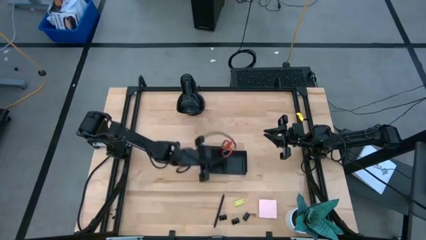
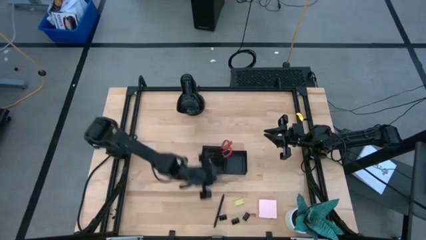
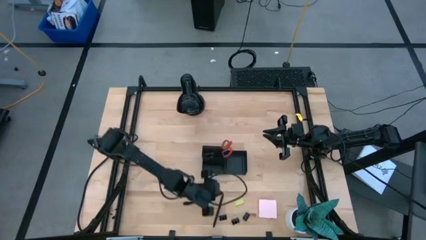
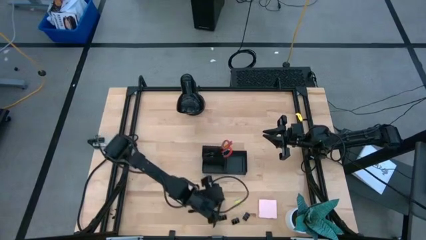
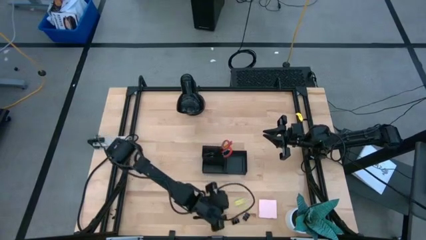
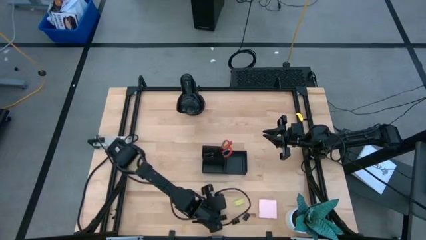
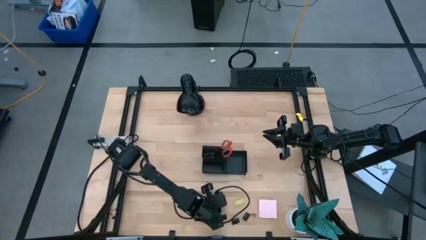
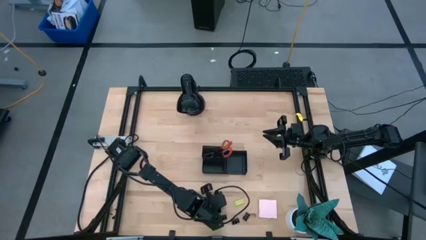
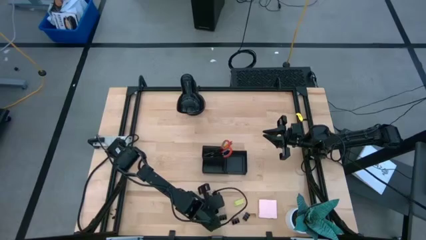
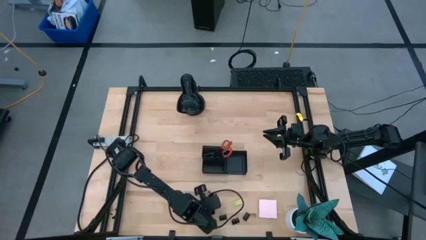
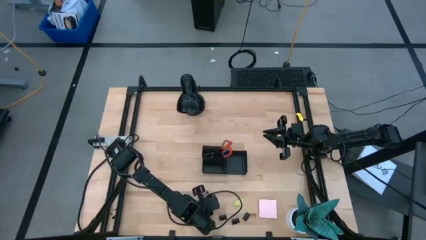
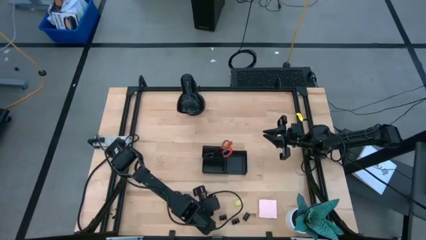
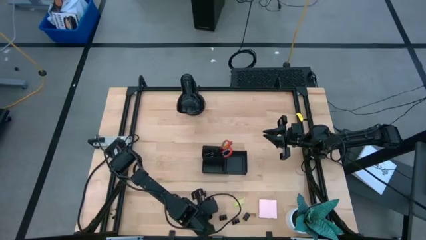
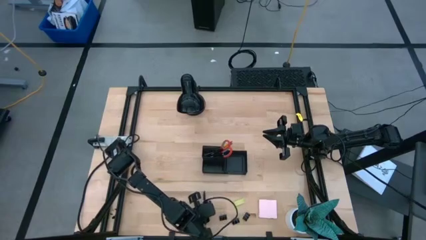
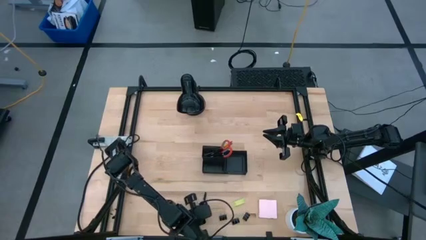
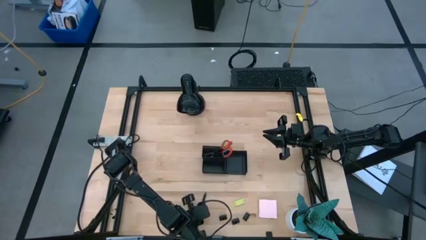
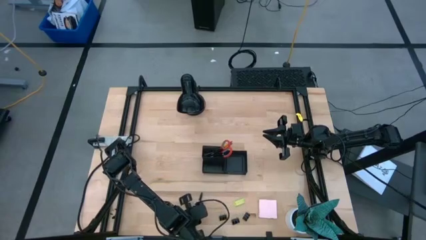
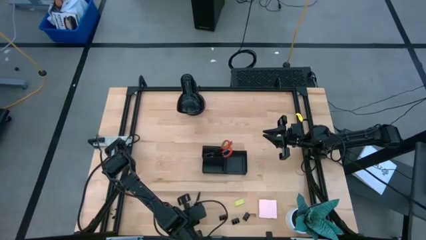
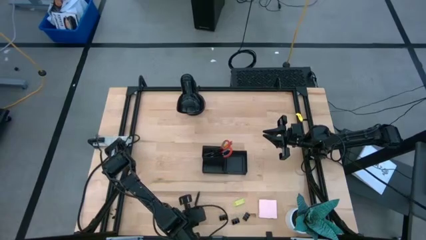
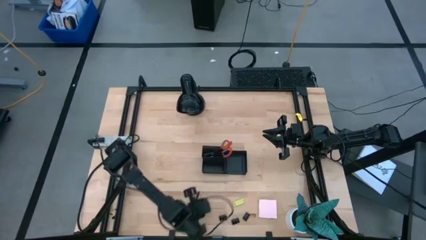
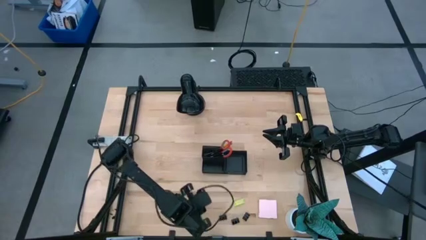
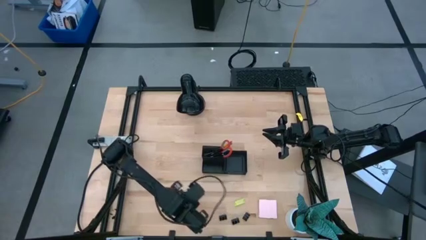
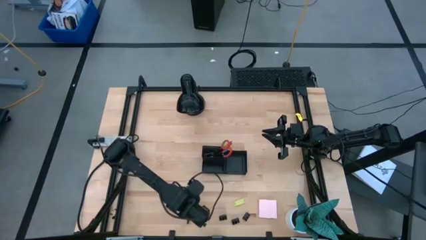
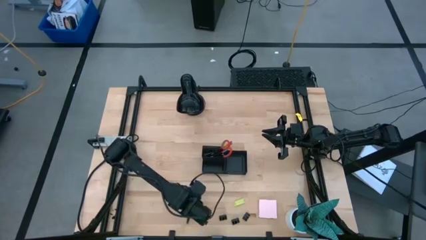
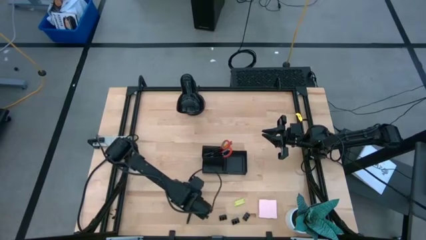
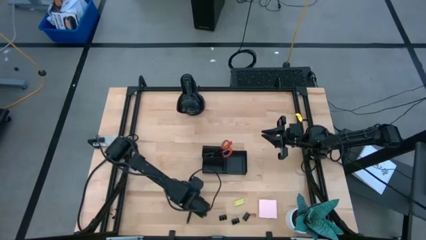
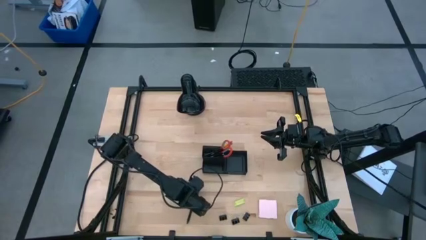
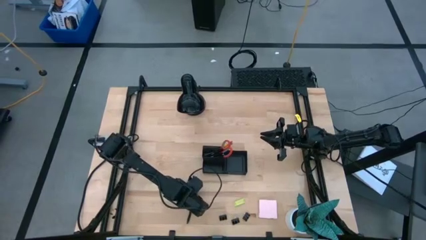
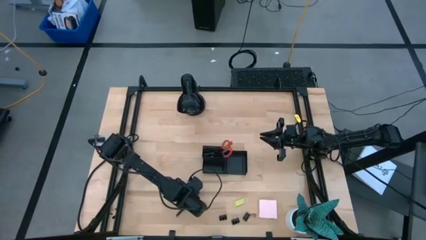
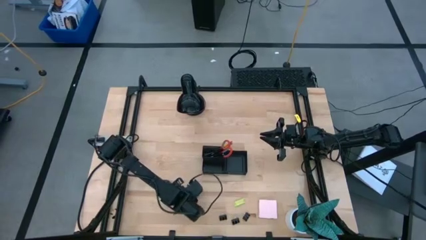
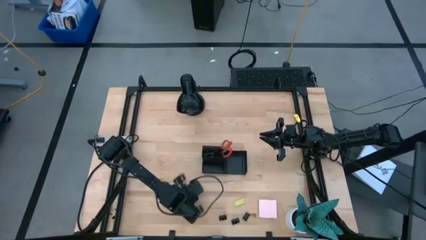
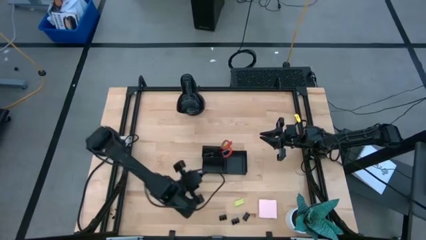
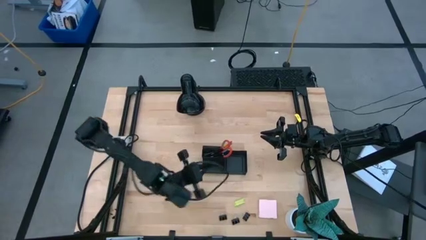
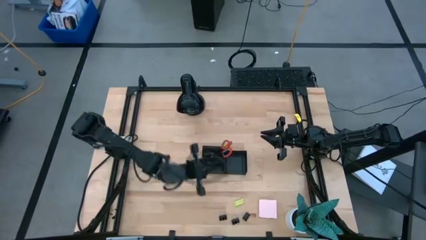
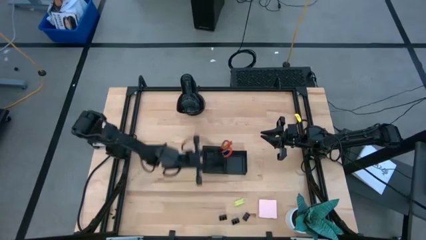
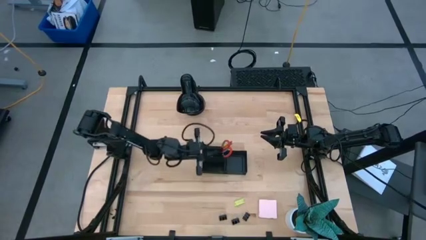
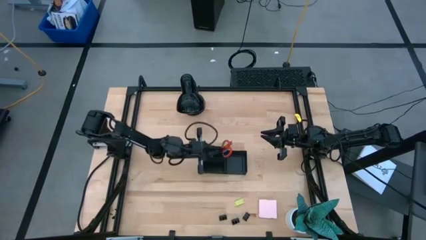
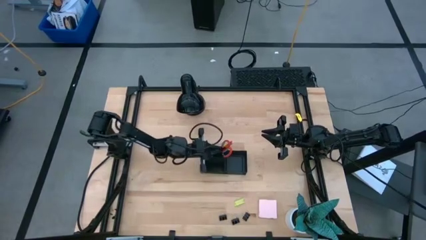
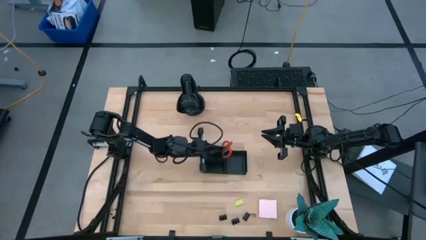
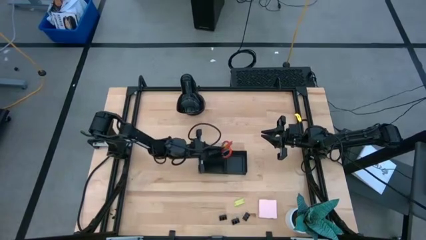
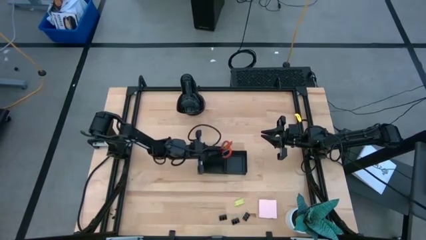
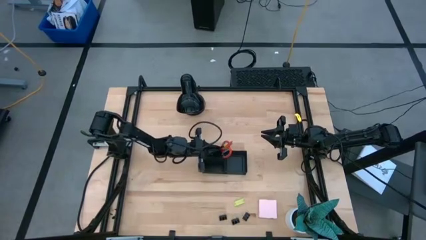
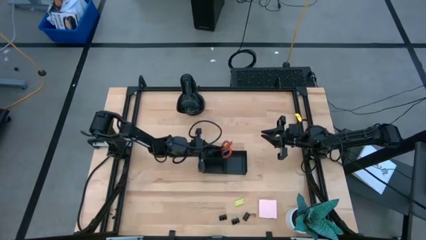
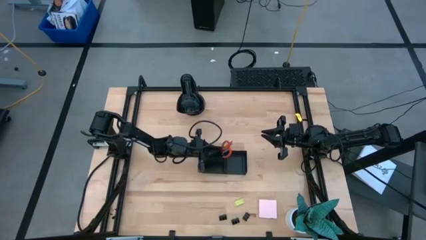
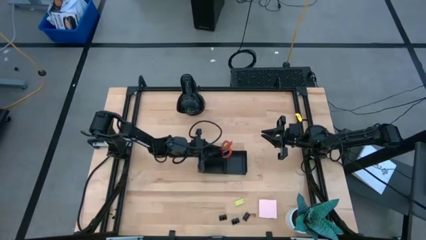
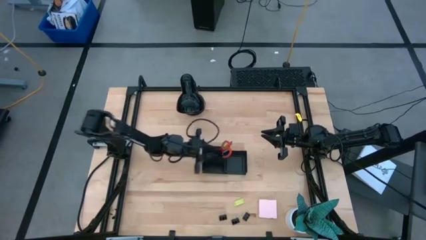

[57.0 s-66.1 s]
Task: Pick and place office supplies into organizer
Put the pen into the desk organizer

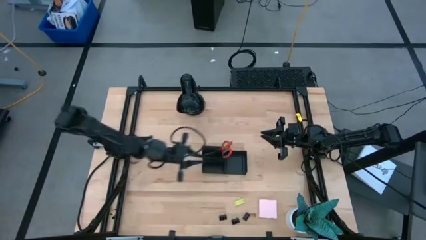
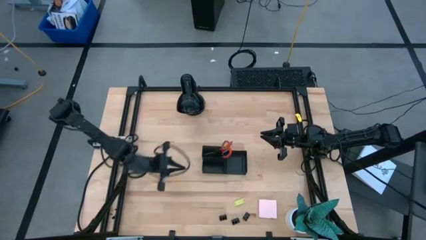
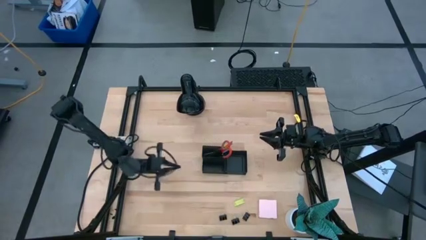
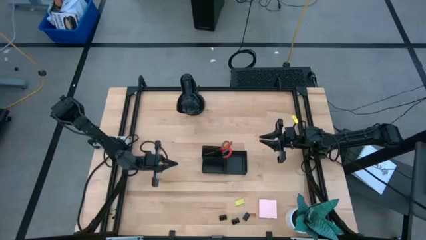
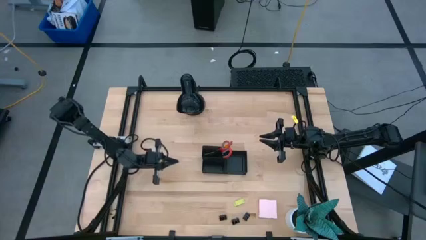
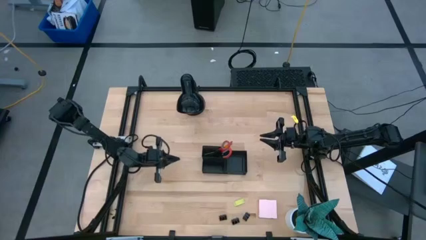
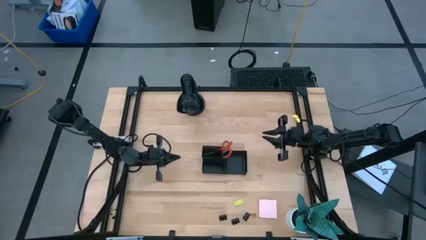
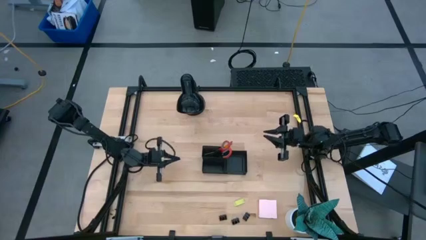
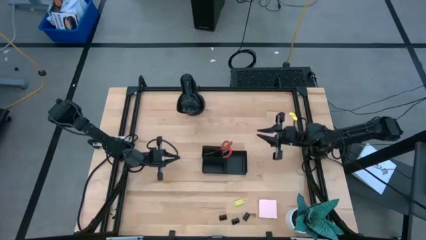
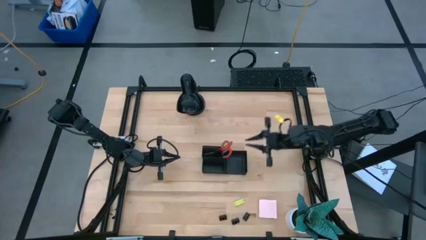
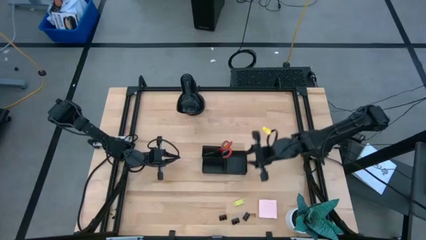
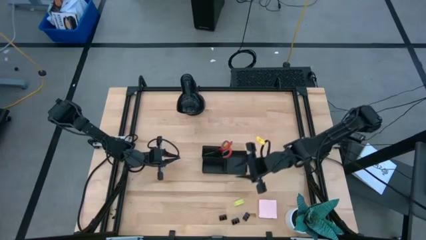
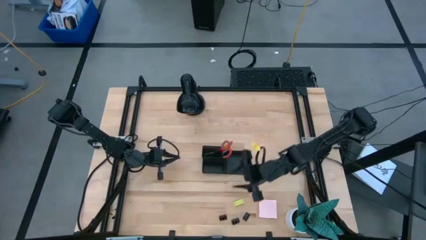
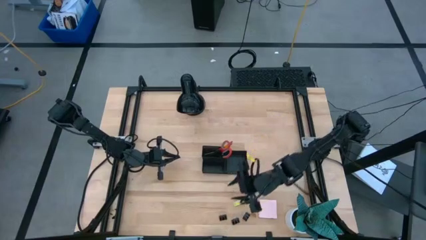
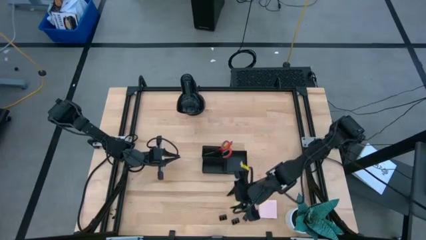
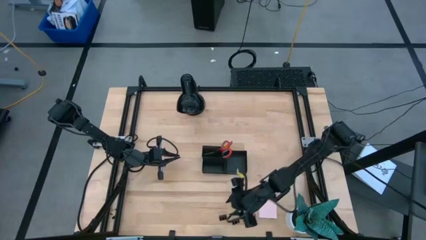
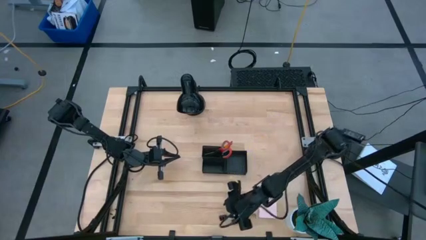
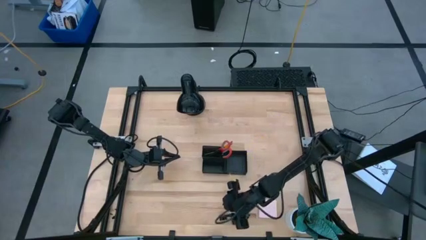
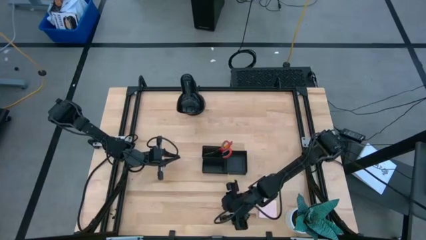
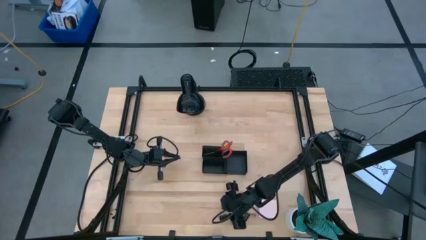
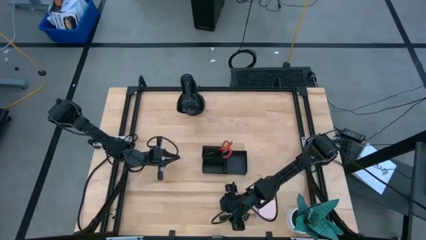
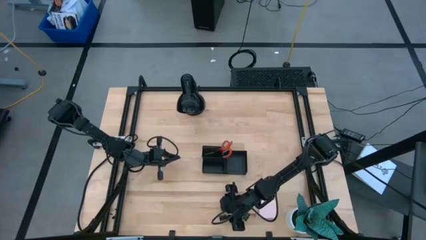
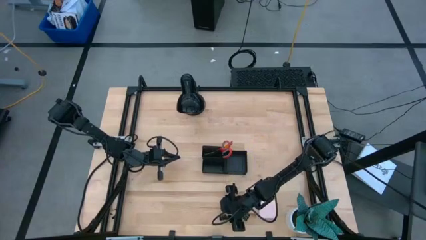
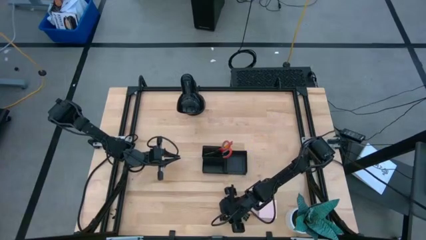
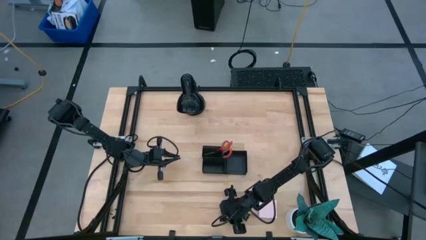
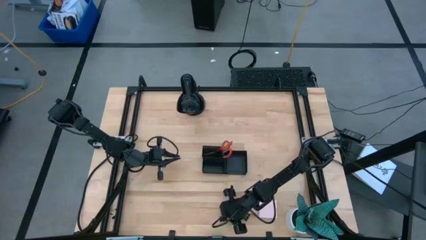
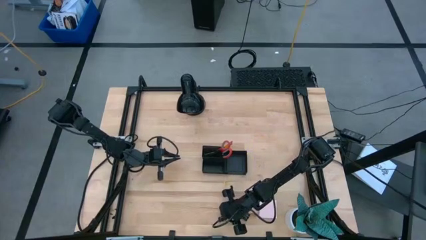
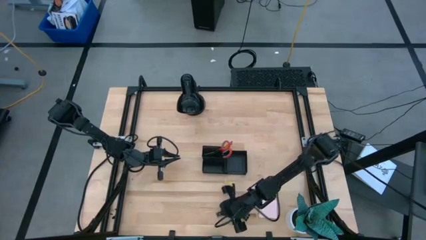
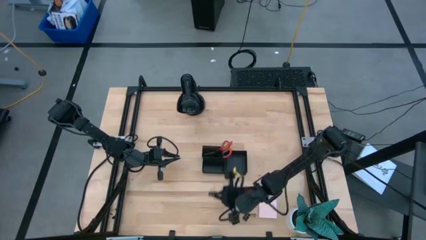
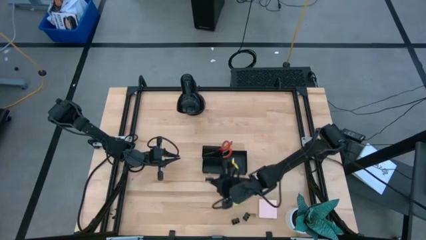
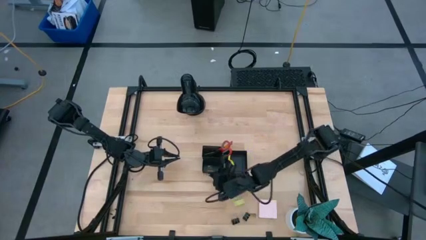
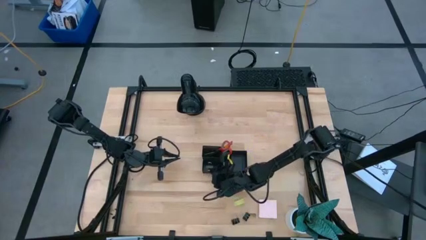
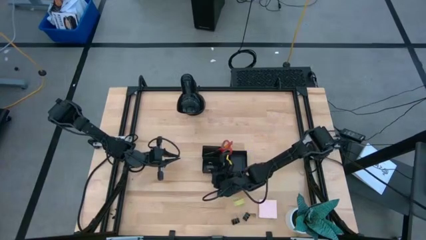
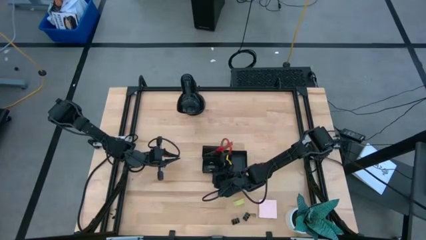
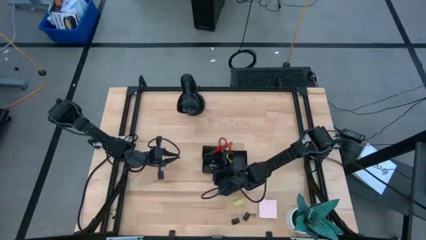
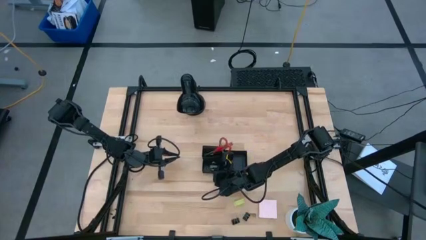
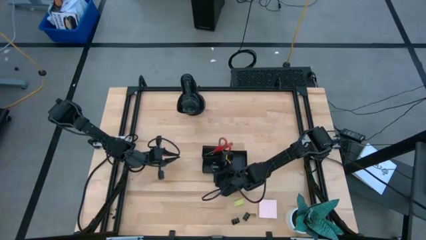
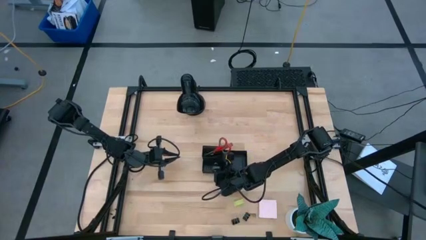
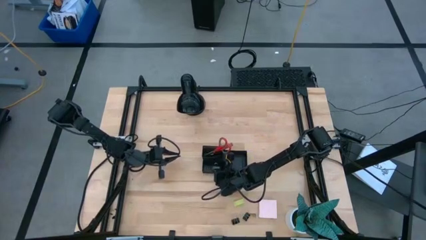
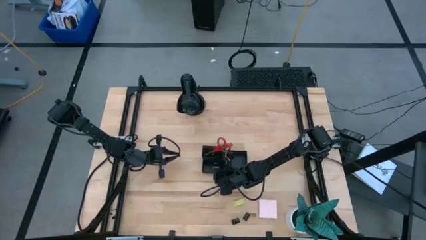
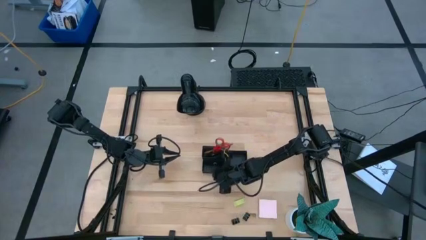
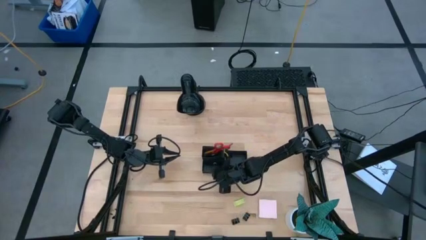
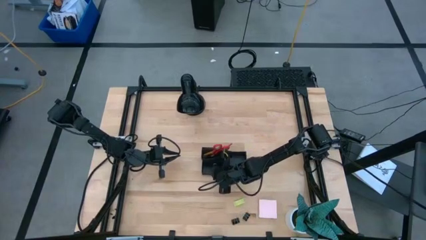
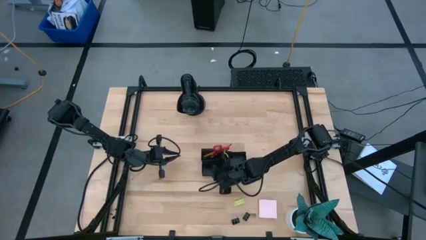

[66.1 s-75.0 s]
Put the left binder clip into the desk organizer
